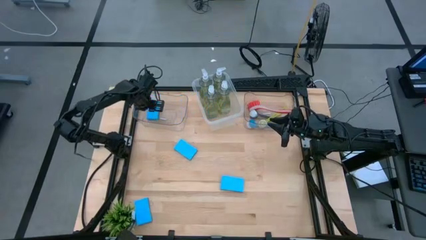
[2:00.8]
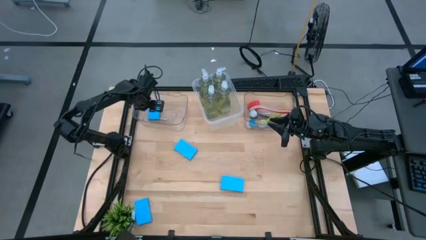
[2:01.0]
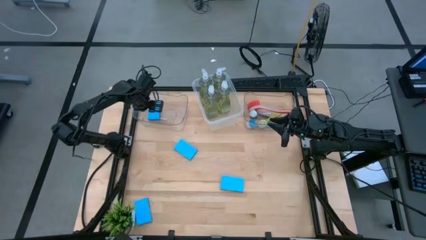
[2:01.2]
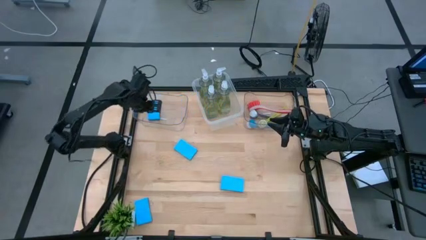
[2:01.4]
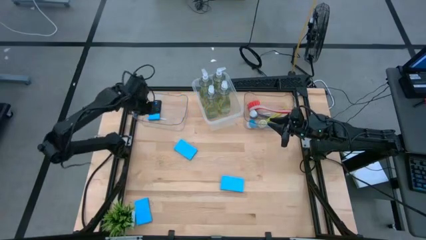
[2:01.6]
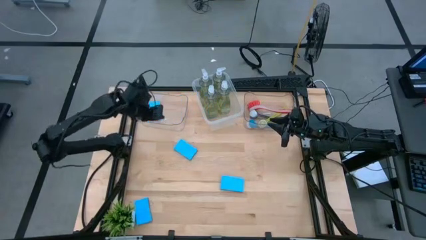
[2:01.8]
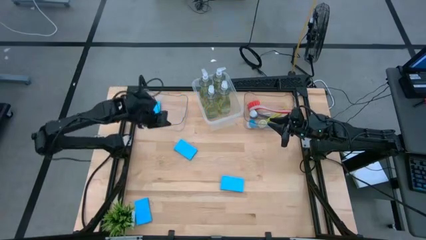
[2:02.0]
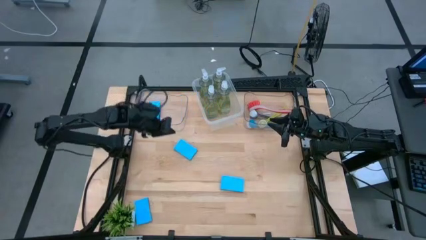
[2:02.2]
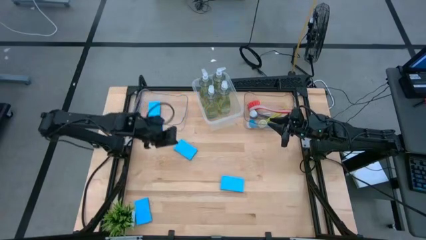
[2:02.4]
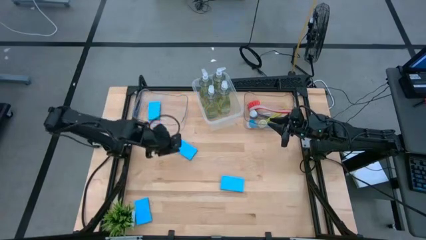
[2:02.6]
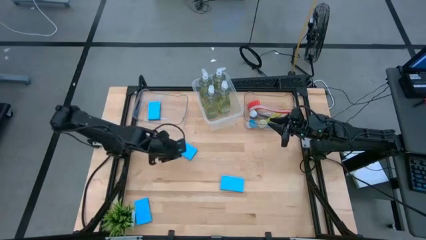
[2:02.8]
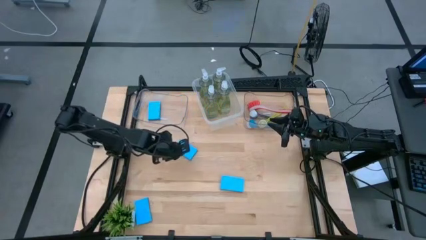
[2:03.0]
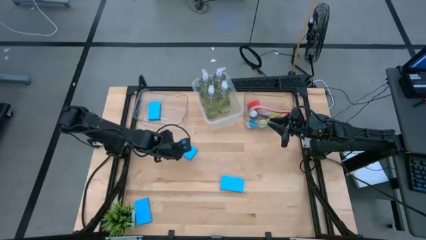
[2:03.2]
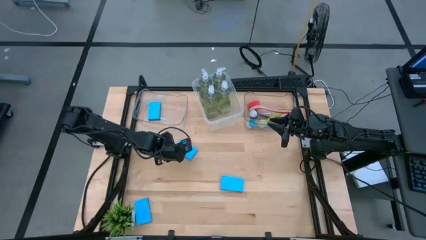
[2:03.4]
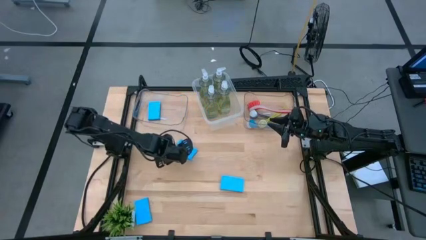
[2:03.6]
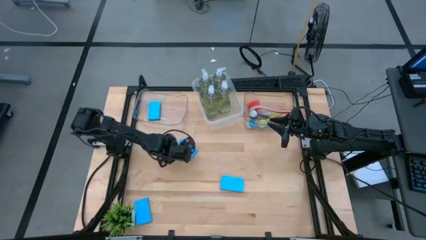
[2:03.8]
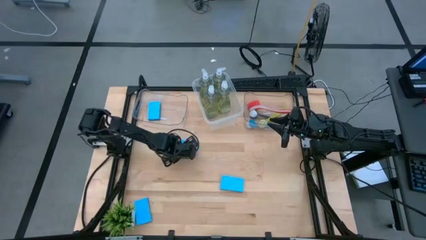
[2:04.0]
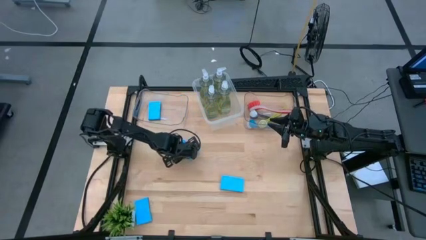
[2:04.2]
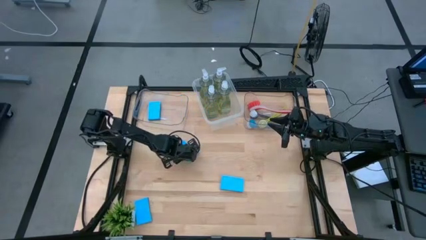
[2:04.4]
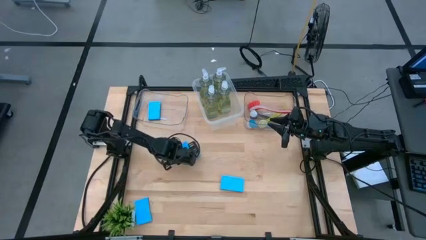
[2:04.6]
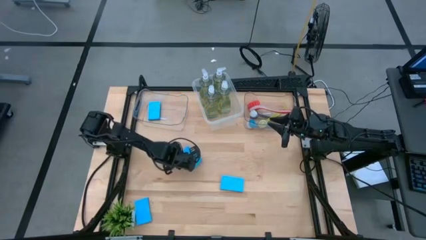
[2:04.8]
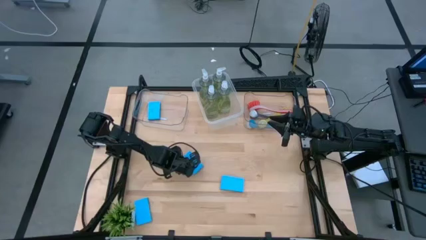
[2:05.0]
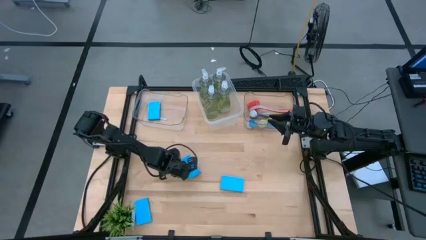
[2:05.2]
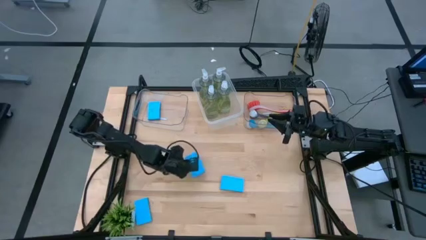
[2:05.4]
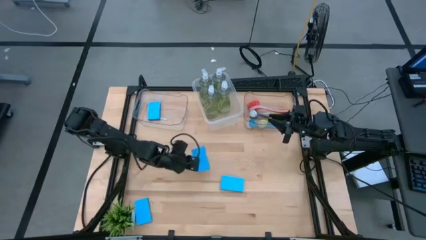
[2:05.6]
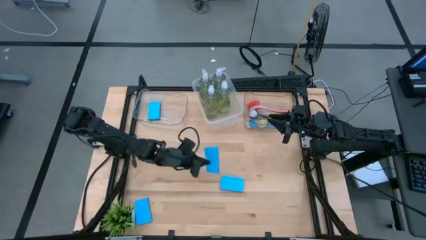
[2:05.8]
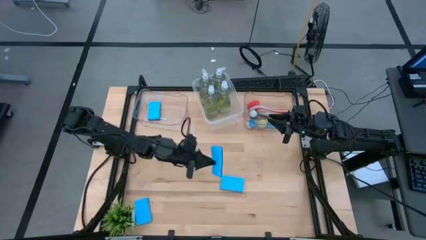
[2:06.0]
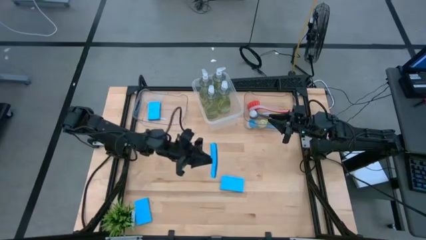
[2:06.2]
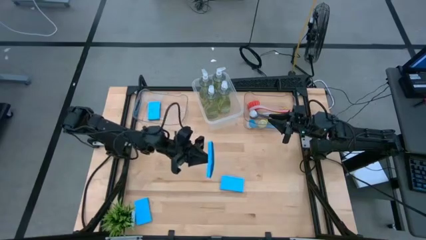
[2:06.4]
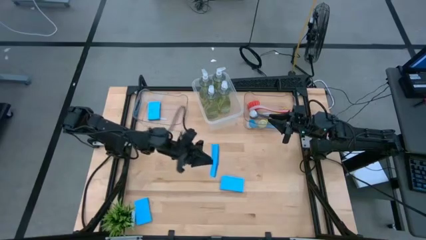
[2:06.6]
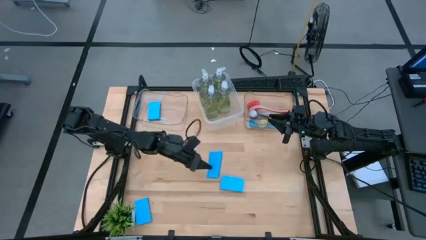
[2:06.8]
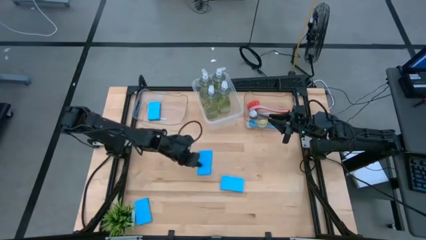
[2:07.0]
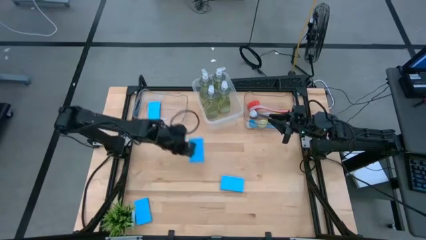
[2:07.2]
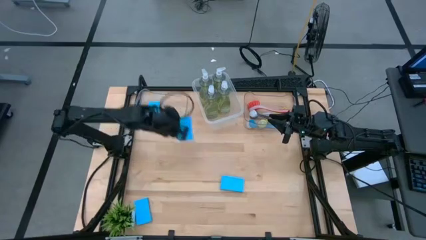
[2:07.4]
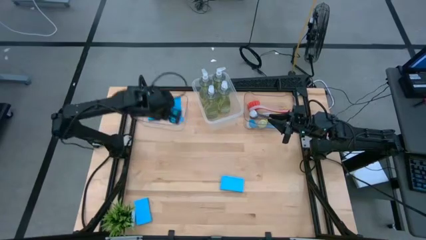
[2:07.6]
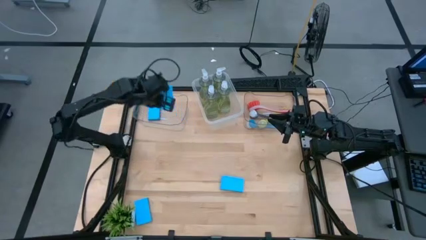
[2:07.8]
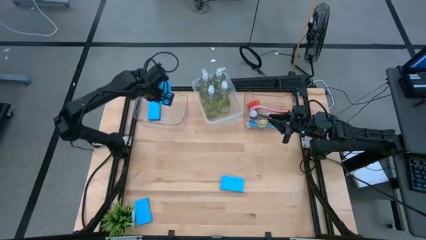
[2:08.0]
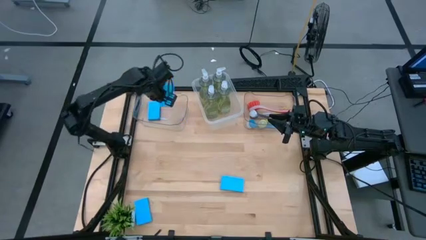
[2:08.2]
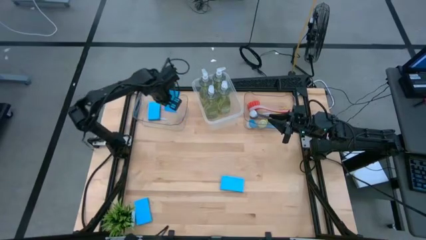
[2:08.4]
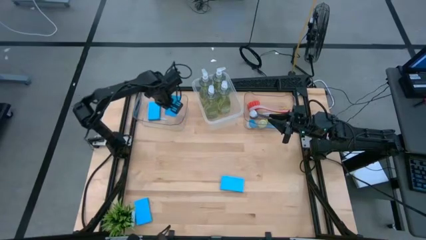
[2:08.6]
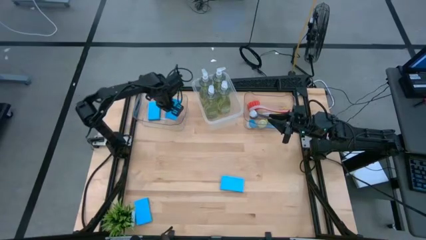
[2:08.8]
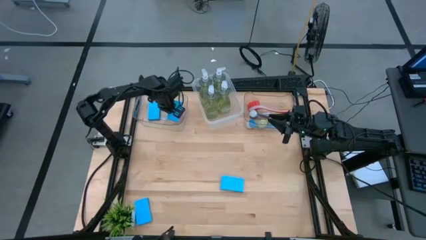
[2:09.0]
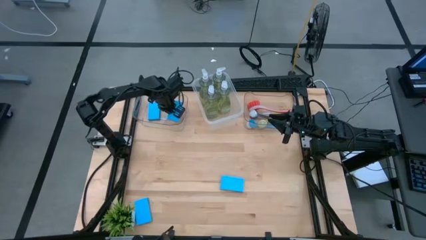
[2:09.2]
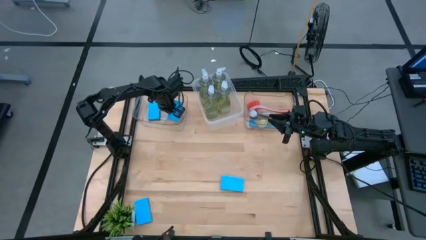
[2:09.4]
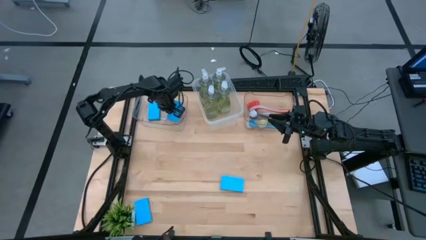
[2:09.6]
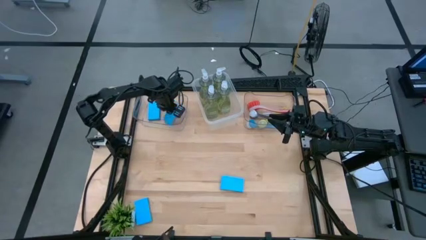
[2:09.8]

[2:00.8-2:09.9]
Task: Pick & Place Kitchen Sink Supplies
Put the blue sponge into the left transparent bin
